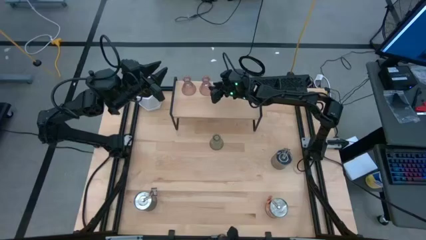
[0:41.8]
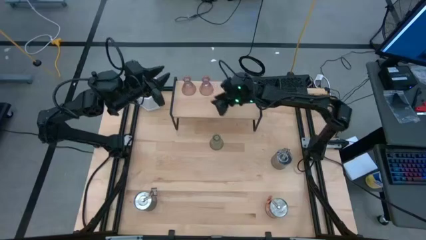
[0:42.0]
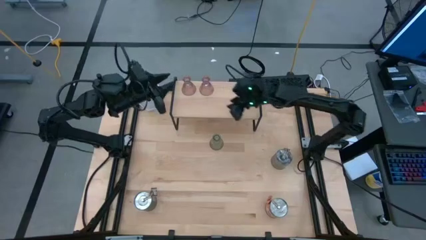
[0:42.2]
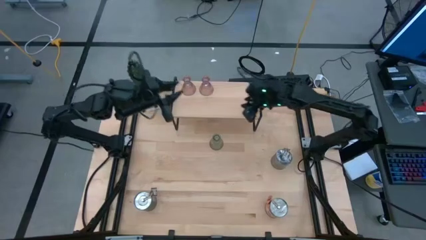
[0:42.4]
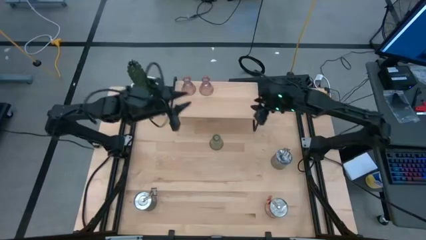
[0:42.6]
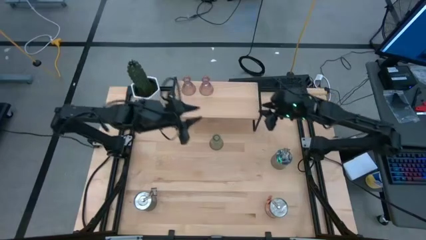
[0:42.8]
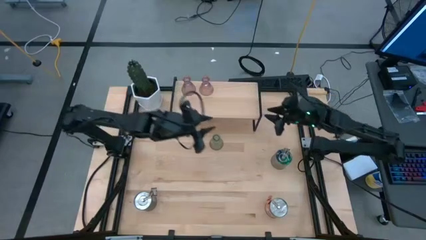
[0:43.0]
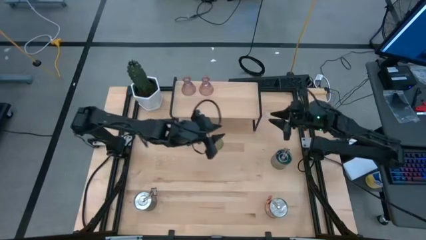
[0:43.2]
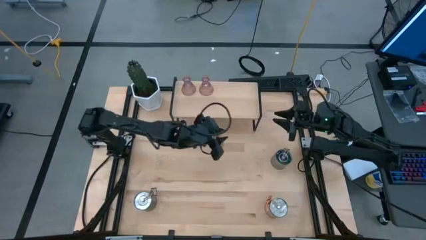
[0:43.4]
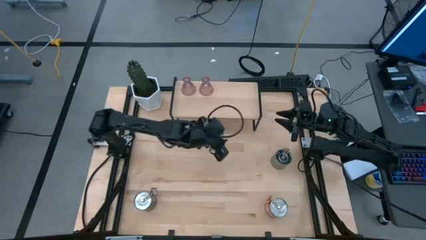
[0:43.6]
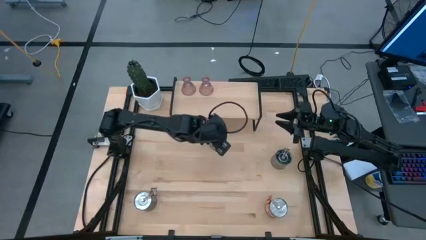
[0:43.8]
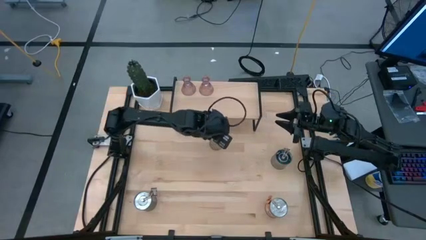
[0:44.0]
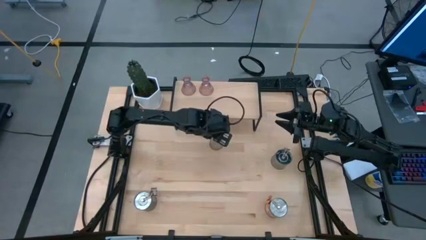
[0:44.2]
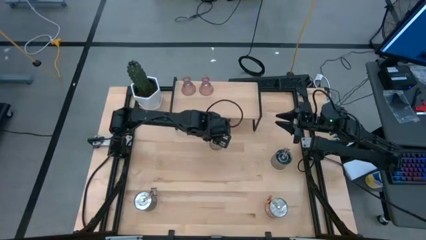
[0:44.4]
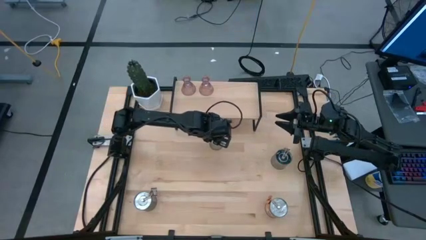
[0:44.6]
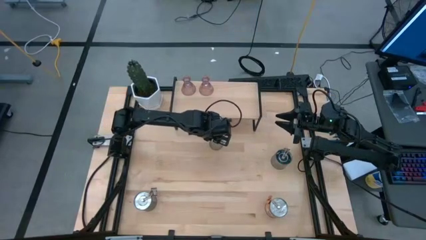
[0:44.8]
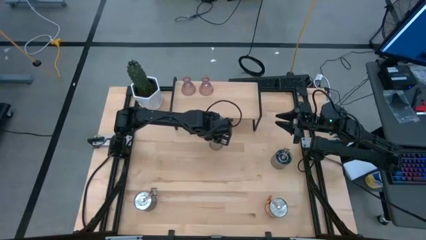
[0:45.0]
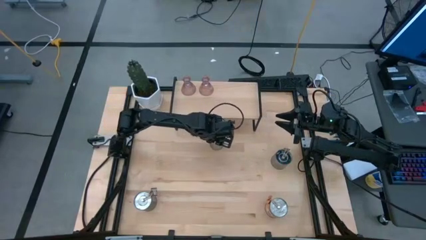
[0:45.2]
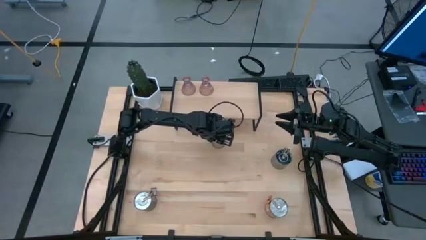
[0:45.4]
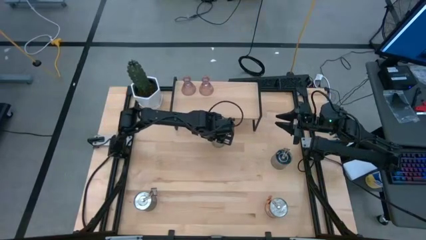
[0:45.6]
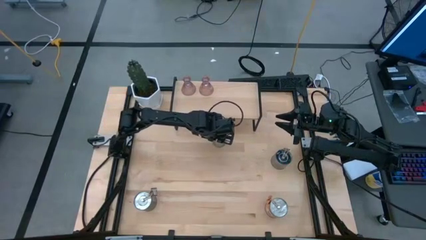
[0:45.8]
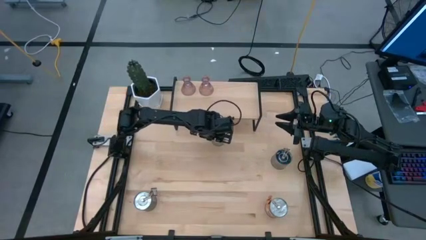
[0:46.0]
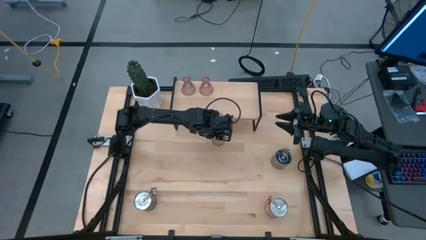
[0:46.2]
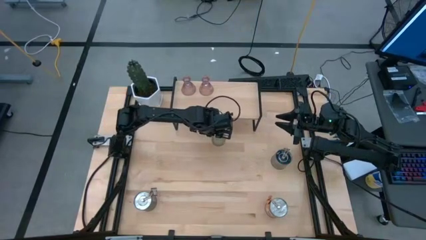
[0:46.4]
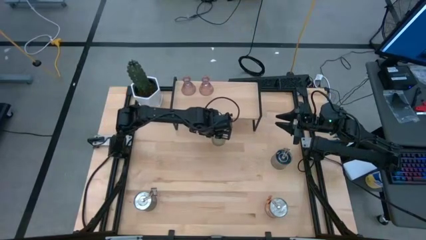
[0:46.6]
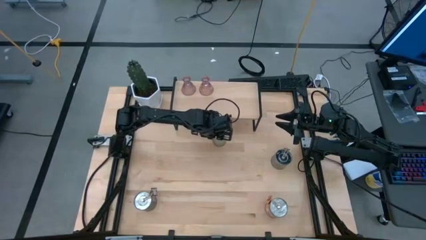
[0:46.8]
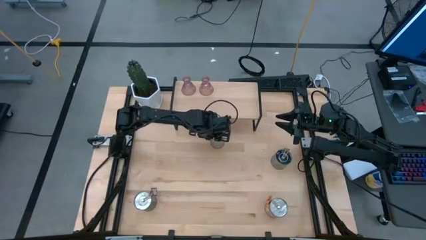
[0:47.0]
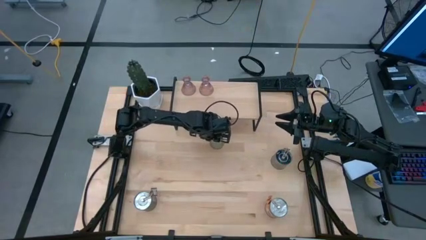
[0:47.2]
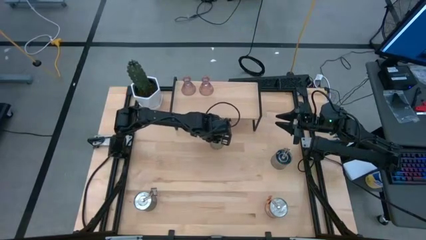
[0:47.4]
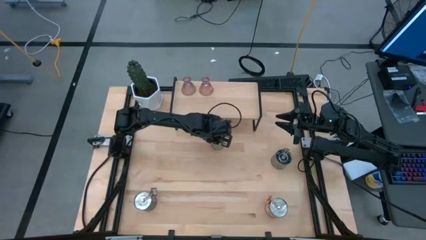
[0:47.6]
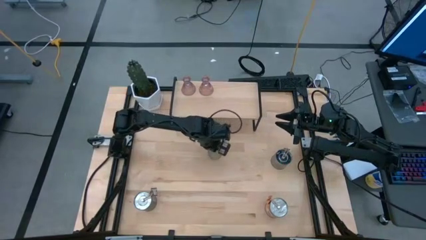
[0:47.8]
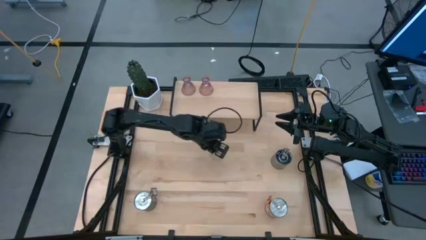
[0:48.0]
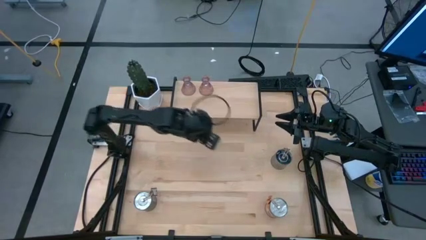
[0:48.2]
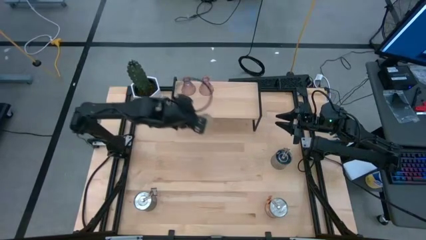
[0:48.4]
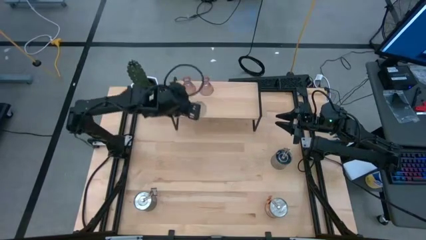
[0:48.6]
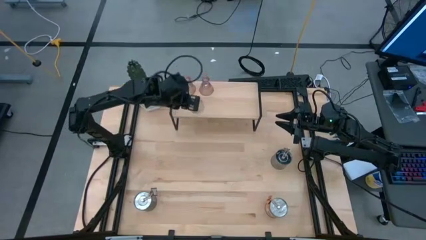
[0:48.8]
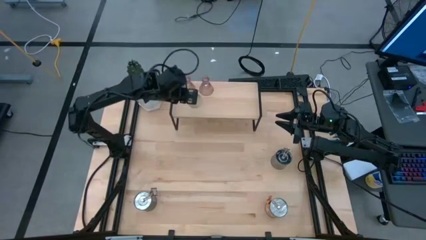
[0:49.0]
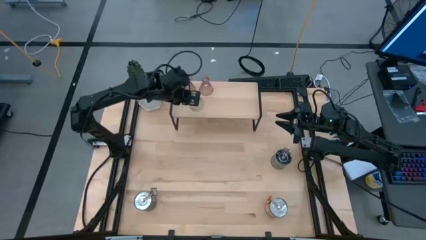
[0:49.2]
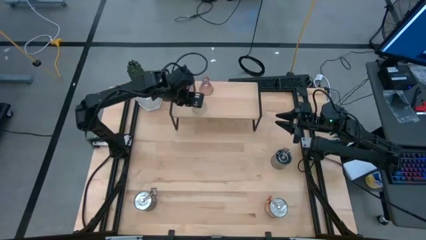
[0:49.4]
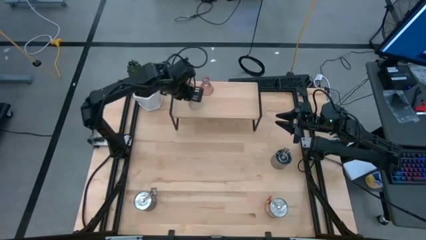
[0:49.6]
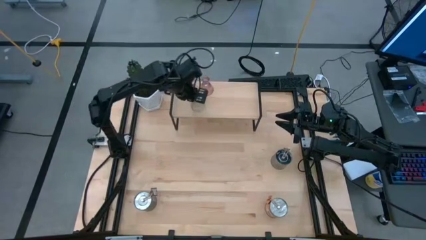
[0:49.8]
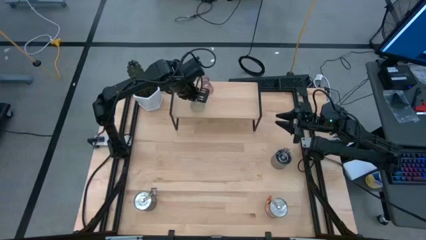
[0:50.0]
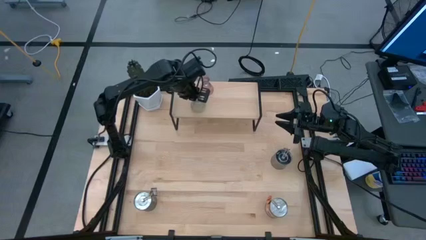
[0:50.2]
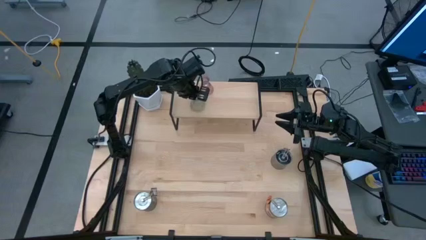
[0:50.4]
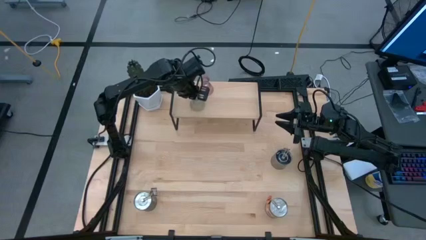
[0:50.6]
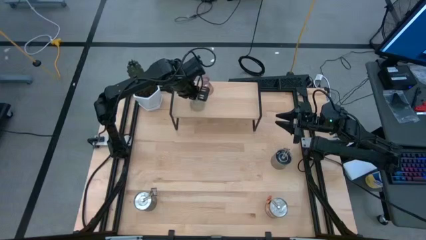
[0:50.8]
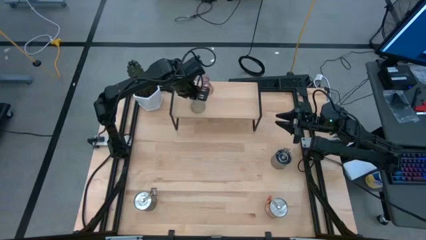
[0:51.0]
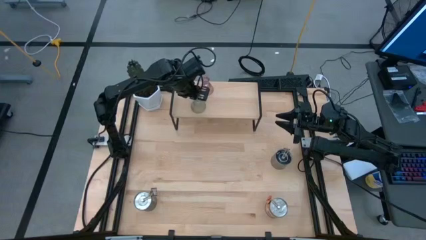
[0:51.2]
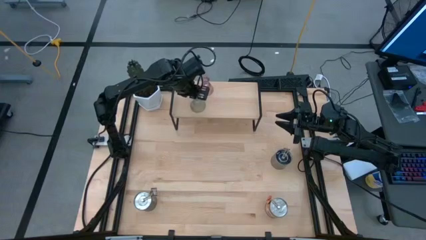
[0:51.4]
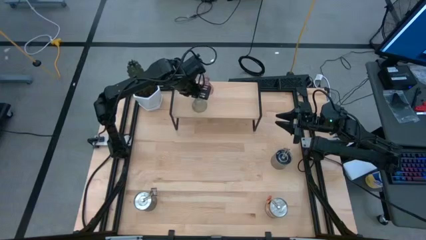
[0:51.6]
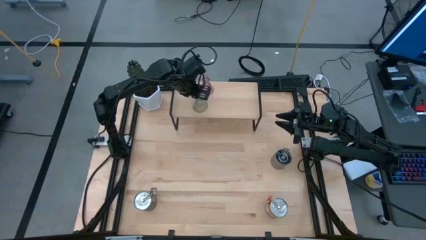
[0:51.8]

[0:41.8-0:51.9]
Task: Pick & Place candle stick holders
Put the green candle holder on the shelf
